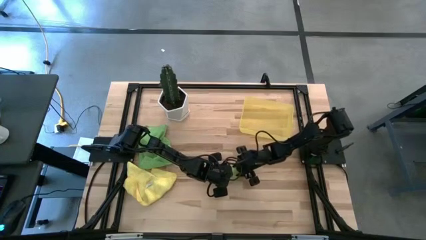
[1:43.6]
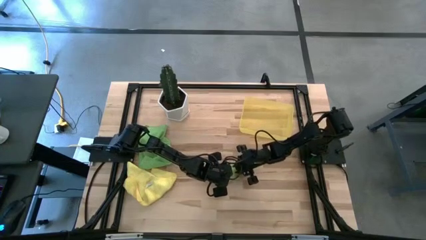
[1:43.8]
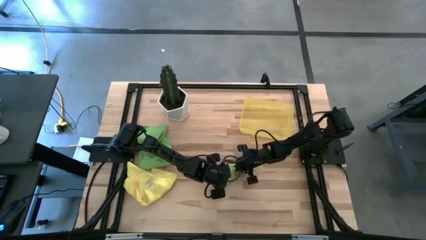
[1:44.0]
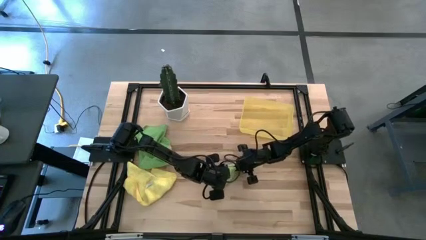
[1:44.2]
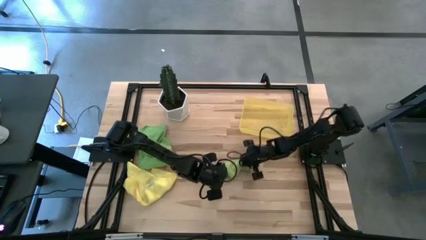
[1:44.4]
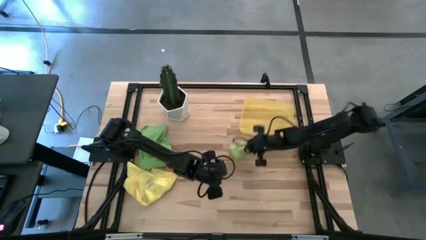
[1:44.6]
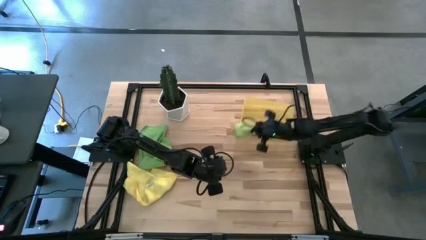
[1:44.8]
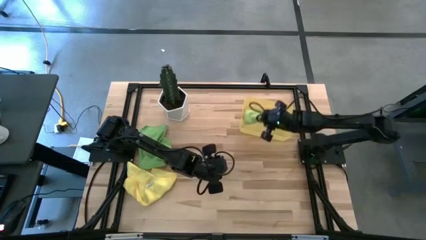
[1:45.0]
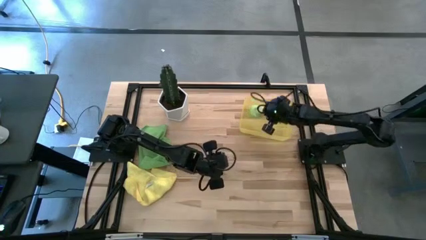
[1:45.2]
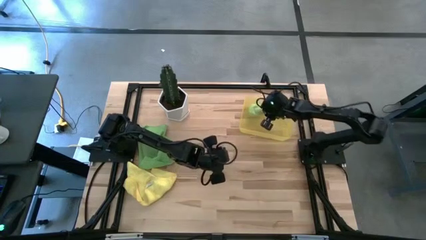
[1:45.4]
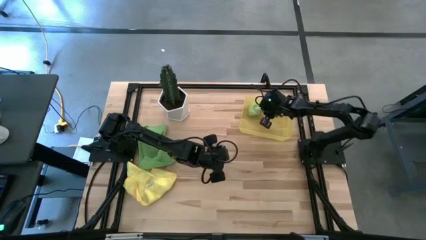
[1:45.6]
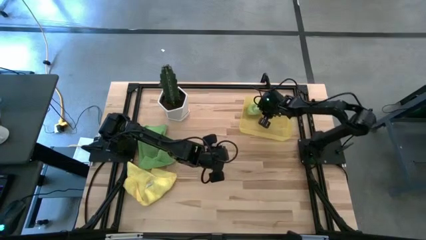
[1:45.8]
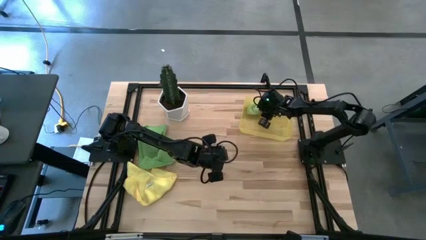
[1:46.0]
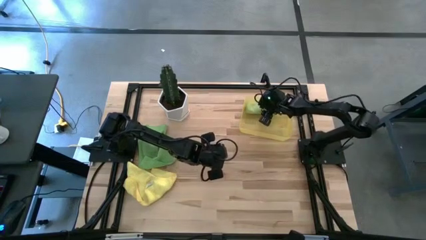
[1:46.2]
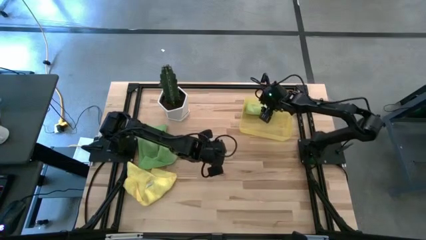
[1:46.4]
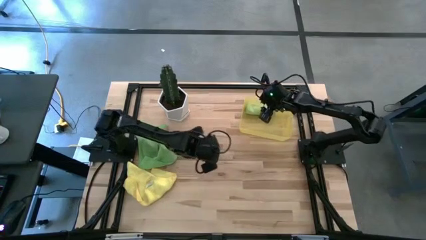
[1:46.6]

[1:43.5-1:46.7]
Task: Roll microfiber towels into tight, uniform cylinder then place into a basket
Put the light green microfiber cloth into the yellow bin

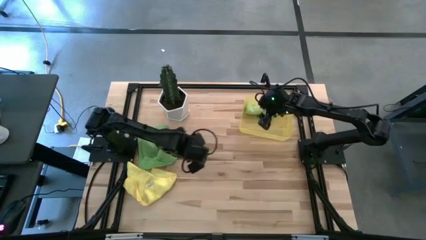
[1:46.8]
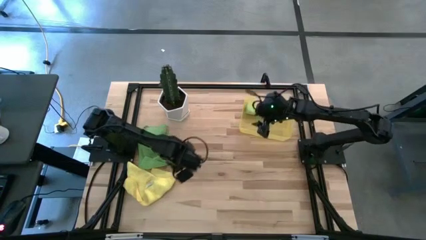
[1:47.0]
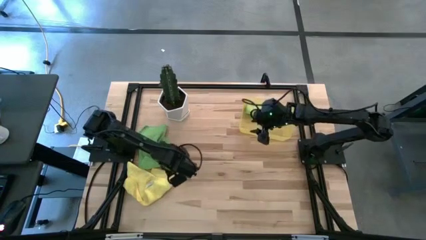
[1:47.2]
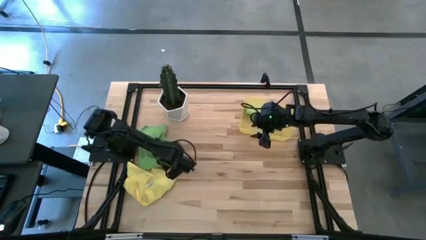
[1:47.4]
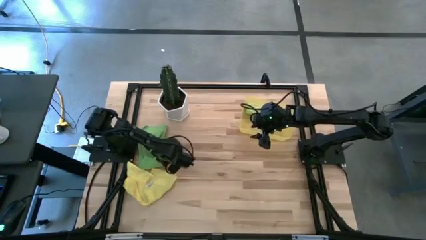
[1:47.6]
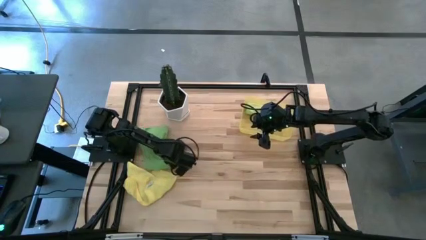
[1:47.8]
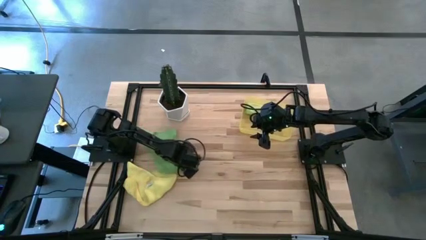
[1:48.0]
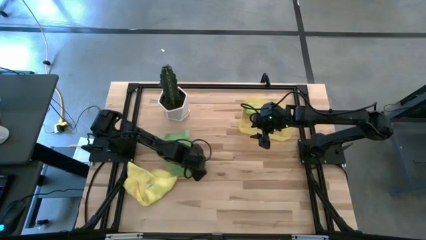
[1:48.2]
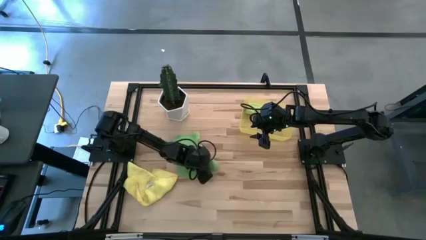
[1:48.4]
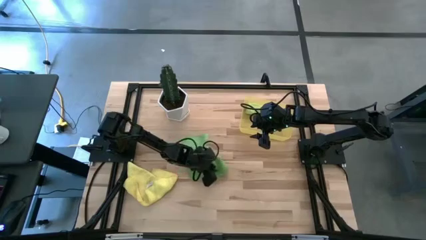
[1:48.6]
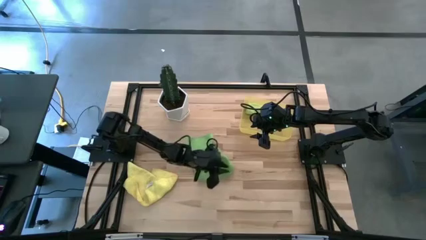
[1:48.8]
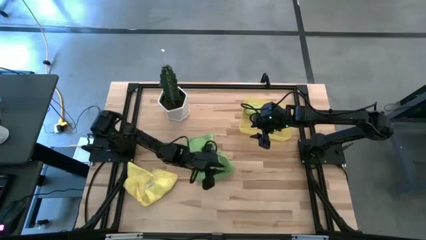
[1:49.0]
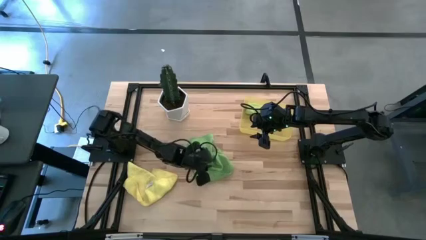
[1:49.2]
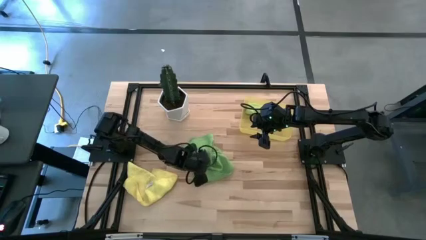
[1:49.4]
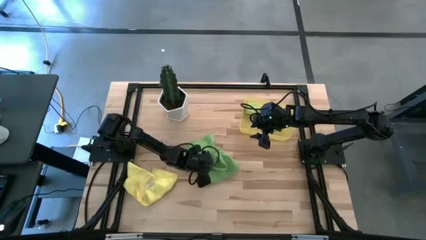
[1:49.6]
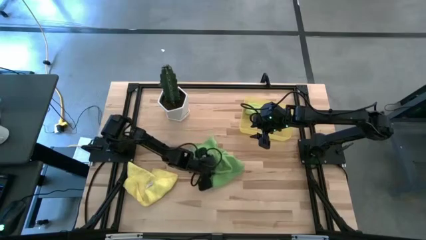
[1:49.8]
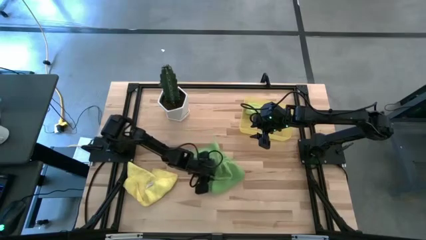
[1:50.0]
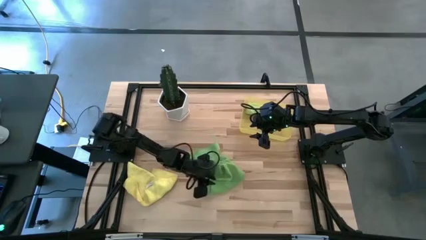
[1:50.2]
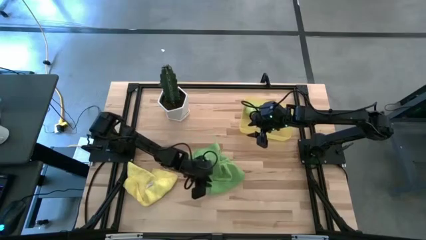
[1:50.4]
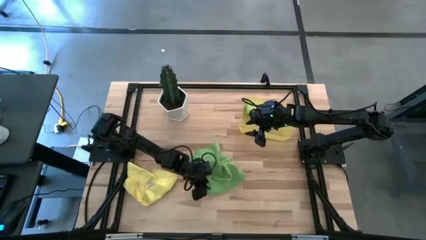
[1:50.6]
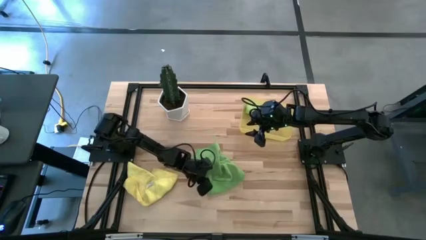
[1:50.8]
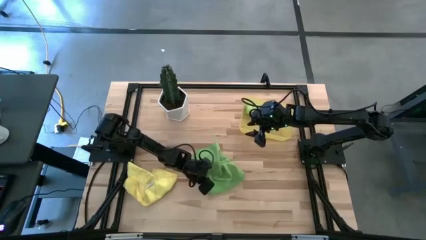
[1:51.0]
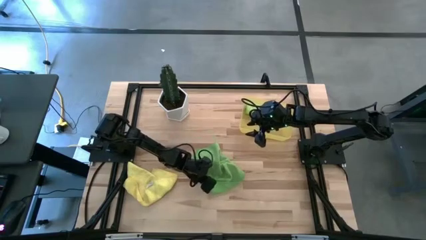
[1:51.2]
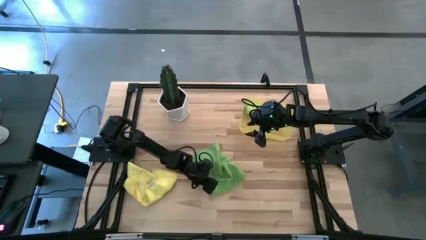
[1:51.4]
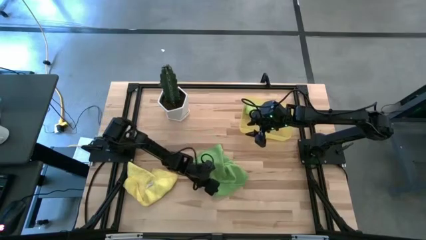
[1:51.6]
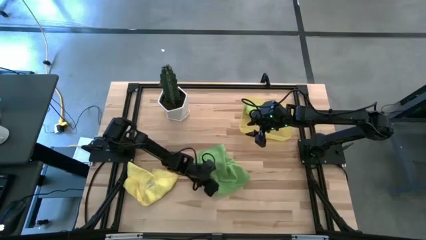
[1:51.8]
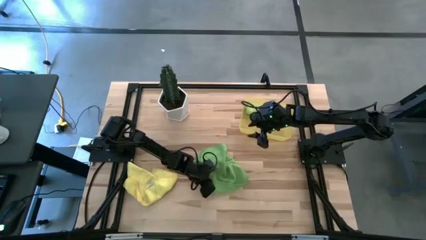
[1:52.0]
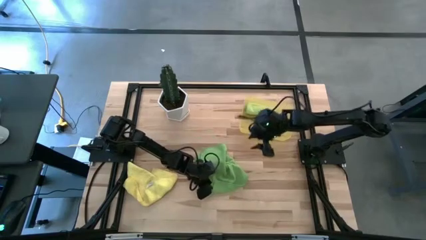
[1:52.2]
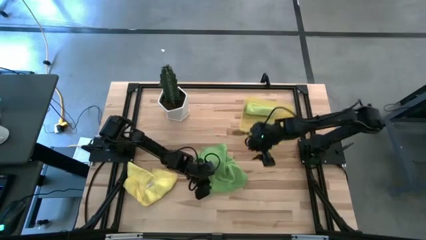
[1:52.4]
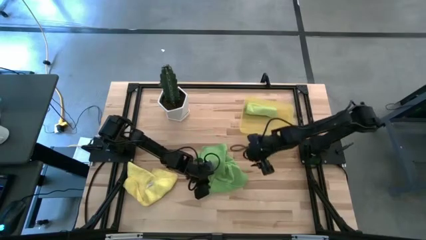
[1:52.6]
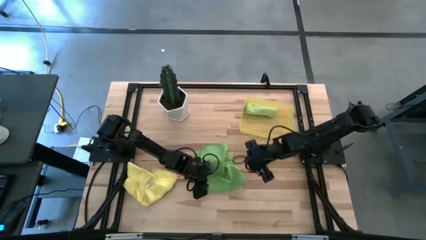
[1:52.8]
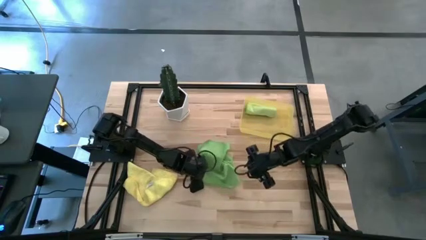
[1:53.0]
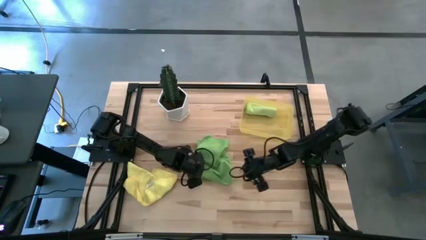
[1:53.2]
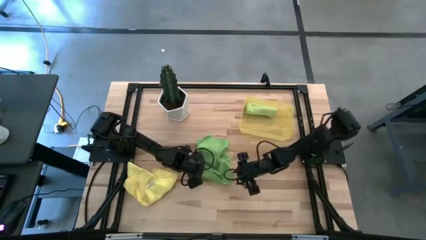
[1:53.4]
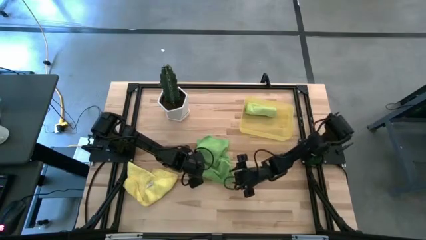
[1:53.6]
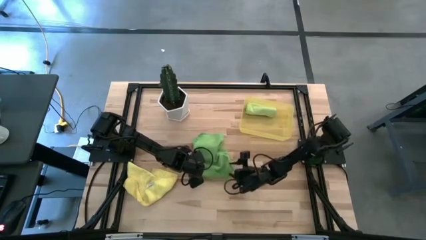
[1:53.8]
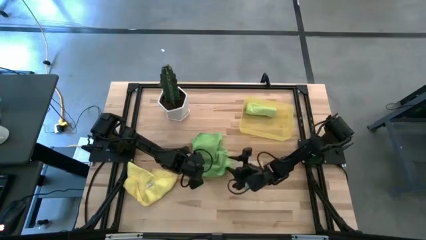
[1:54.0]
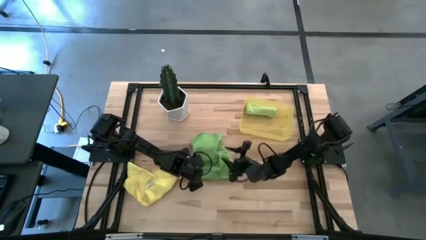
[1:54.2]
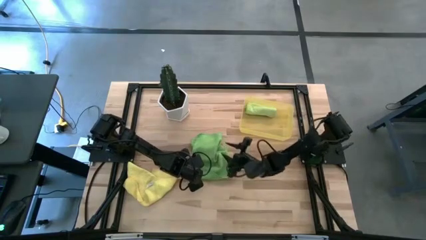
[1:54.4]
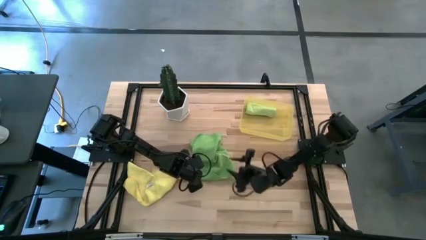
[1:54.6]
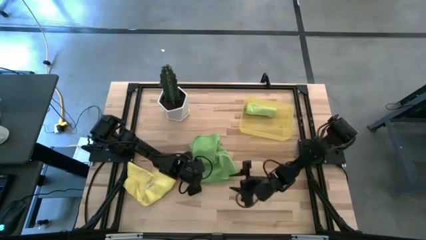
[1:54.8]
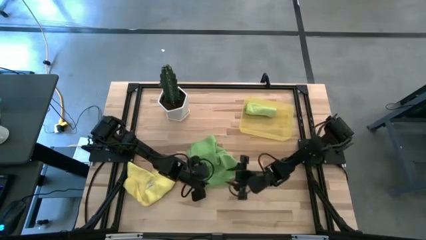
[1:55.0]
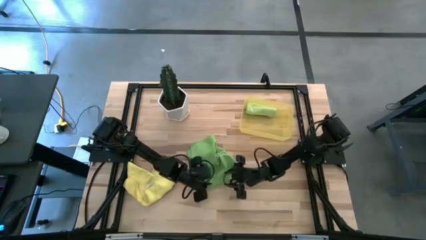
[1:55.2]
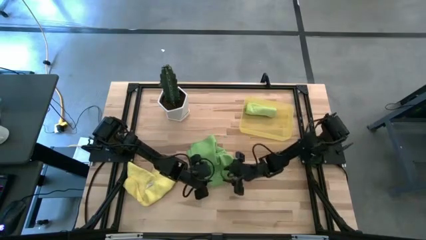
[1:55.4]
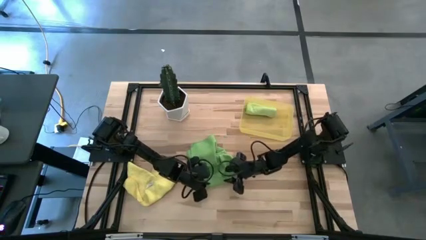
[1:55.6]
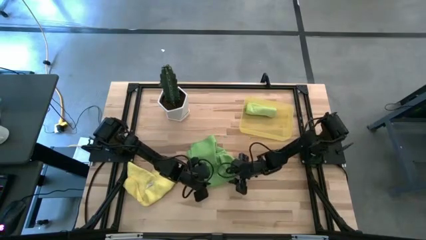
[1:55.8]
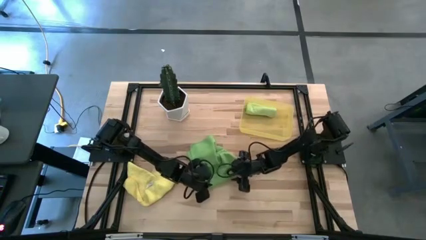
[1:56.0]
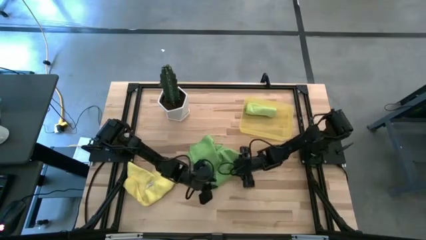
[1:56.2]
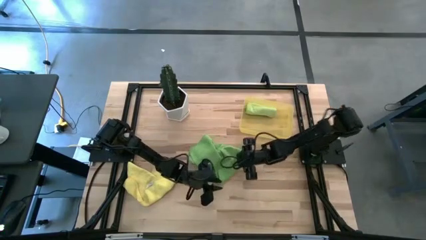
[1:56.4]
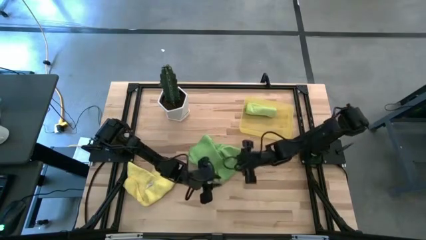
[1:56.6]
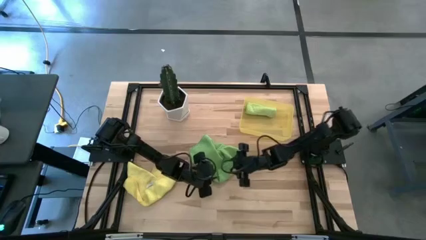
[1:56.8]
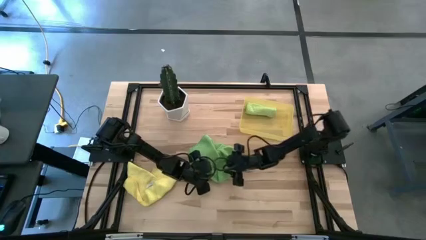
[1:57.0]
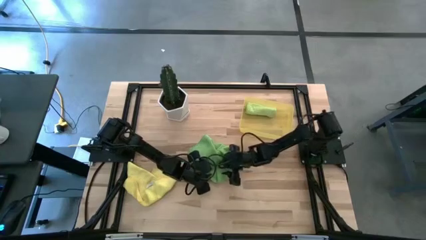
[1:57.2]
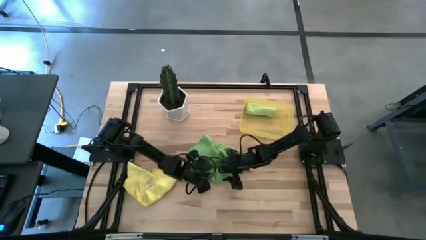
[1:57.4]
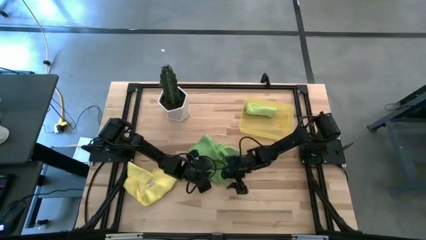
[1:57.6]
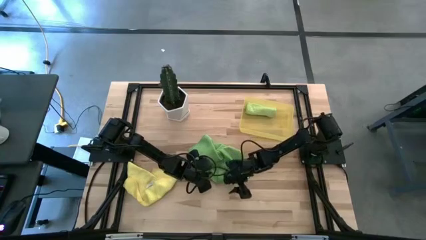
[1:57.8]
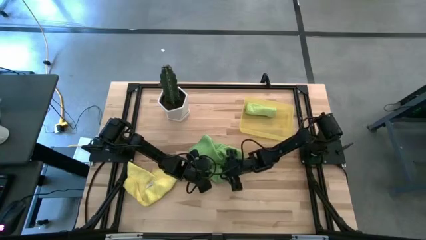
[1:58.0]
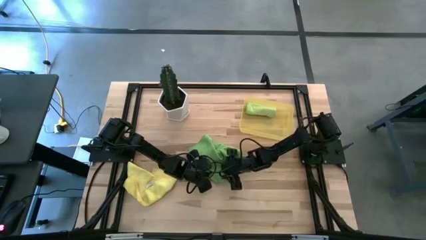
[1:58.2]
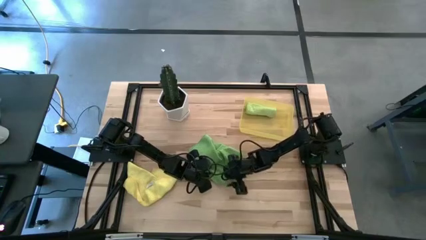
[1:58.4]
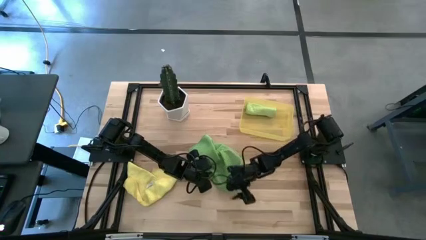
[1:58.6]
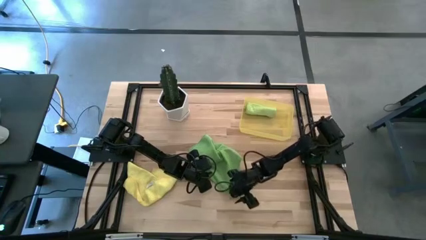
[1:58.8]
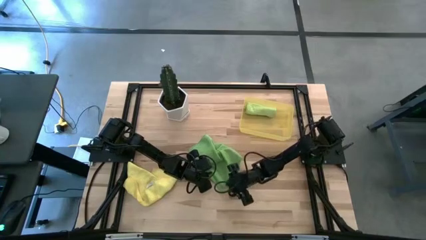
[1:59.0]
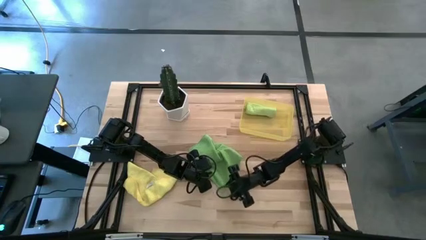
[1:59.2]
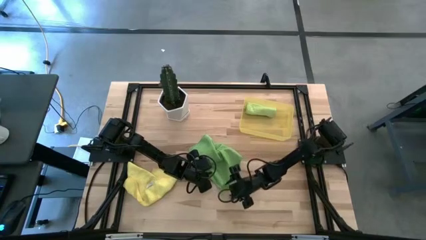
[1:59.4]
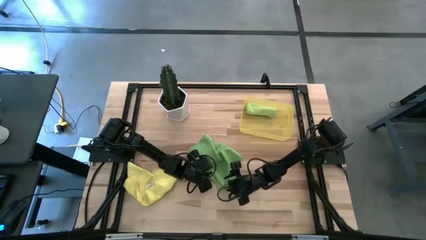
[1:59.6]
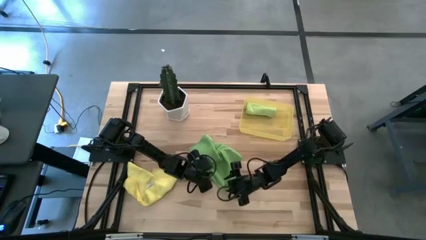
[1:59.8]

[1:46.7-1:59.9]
Fold the green microfiber cloth
